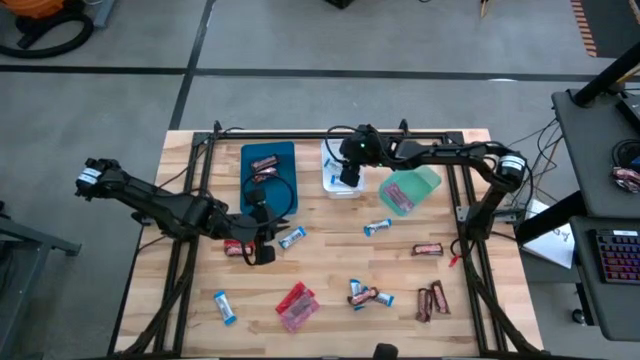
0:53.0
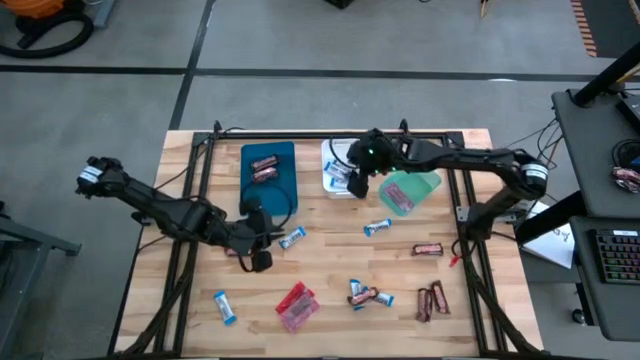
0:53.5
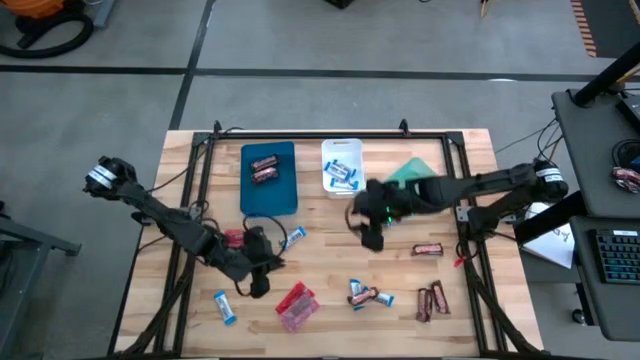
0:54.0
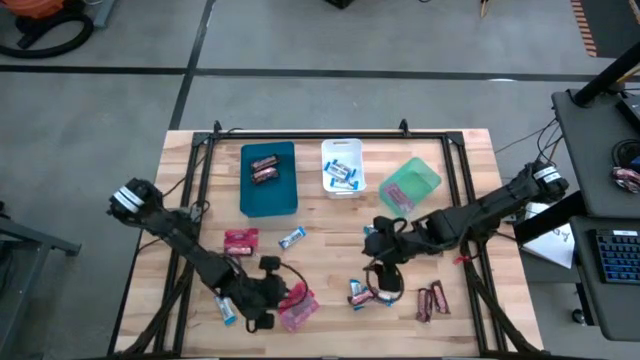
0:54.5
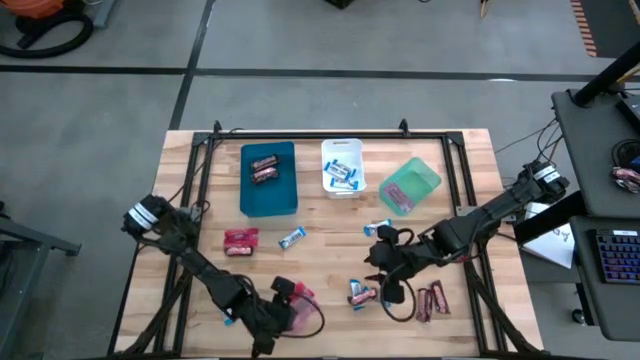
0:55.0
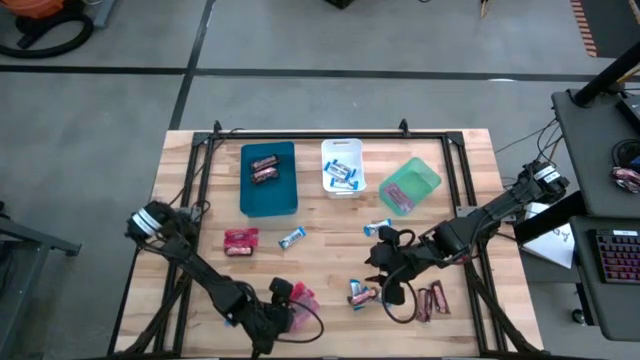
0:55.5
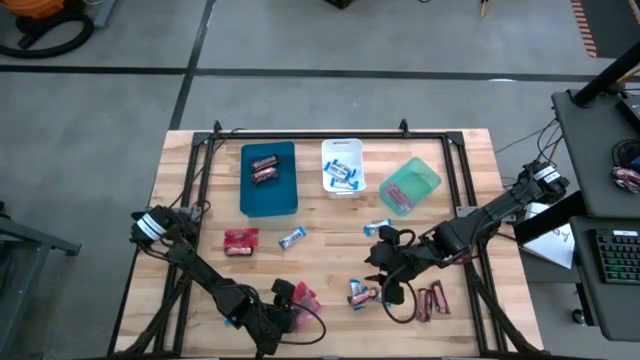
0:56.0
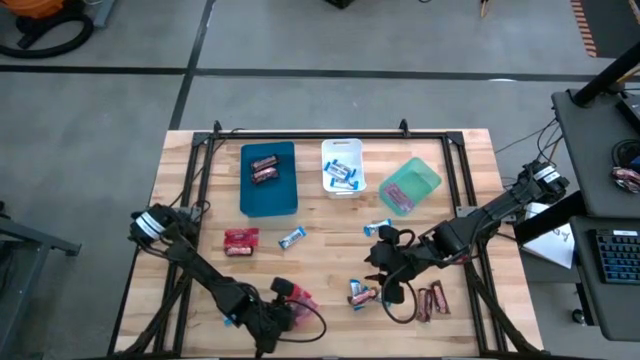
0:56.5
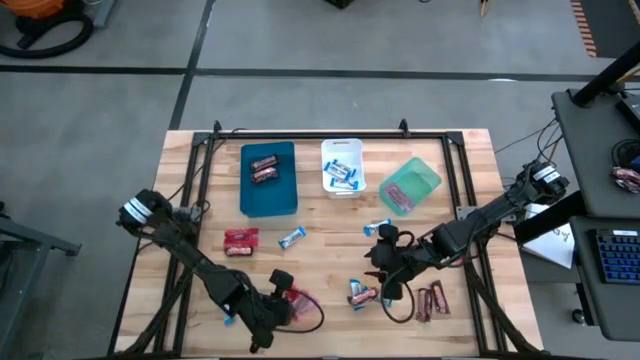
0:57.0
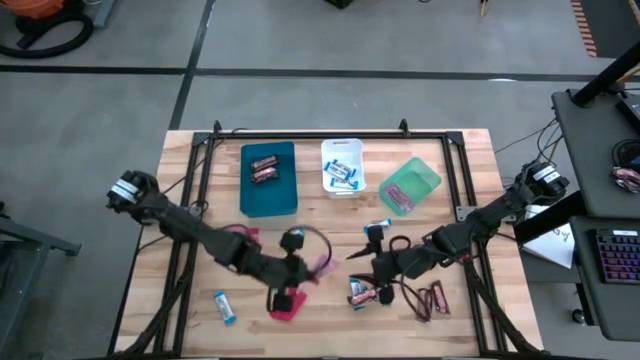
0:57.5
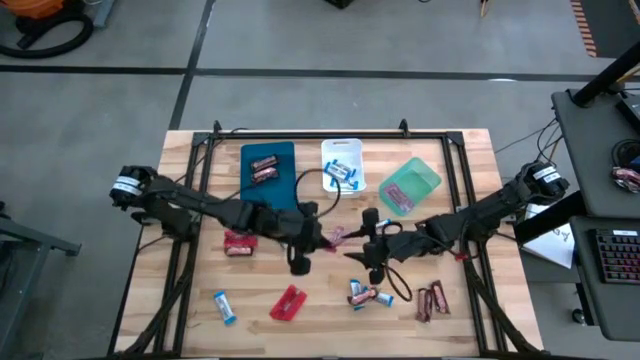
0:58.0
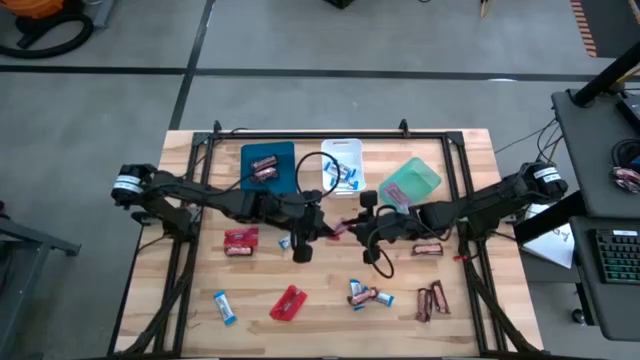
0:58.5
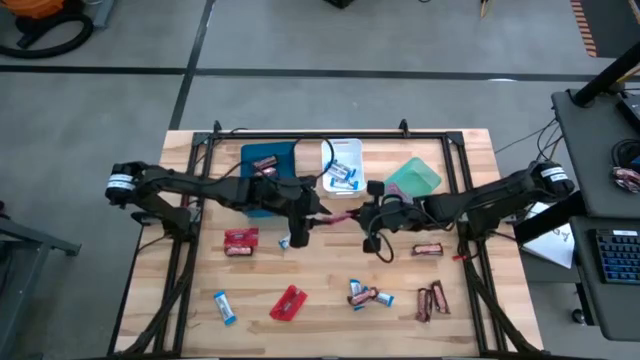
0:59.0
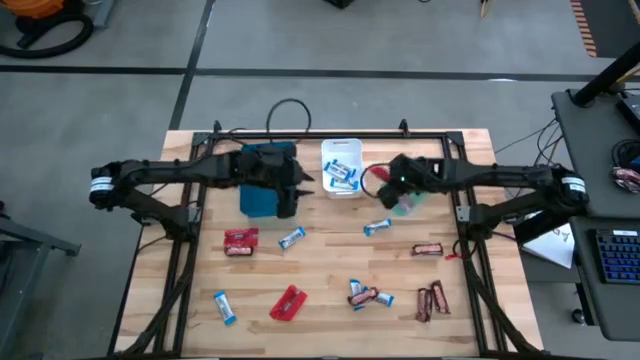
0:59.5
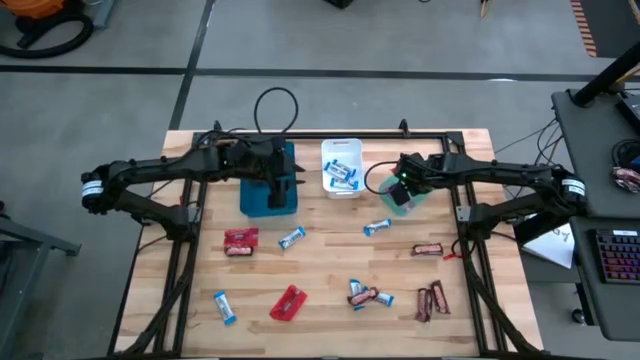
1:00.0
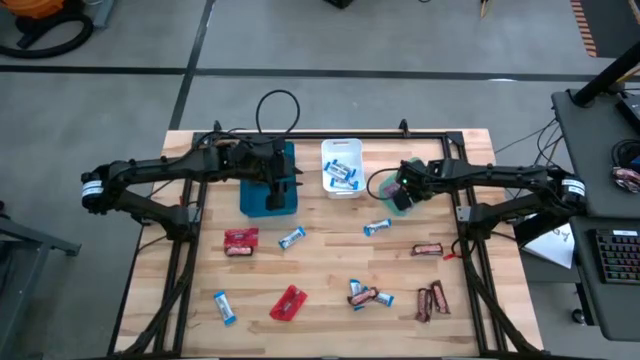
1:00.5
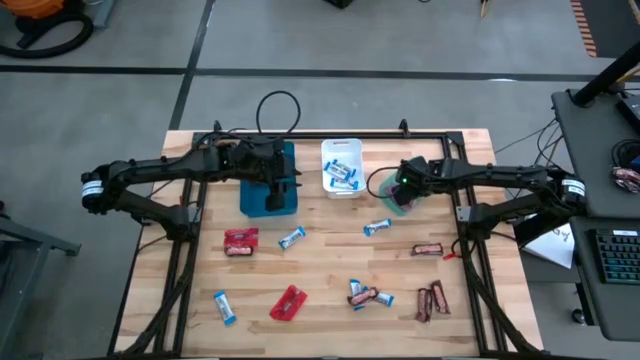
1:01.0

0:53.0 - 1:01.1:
Task: Sort candy
Put the red candy into the green bin

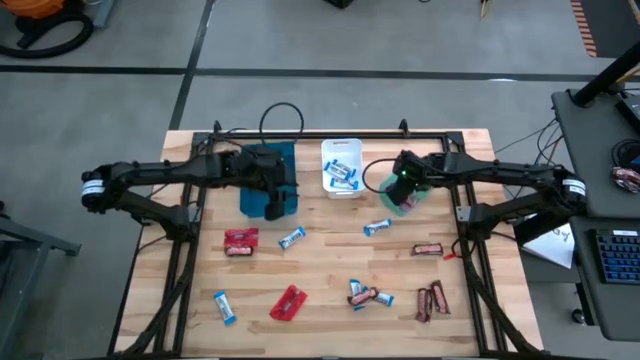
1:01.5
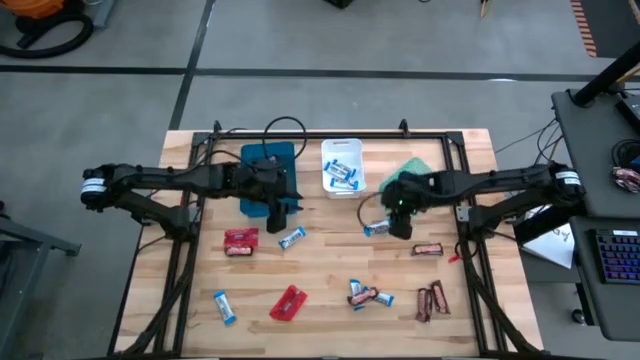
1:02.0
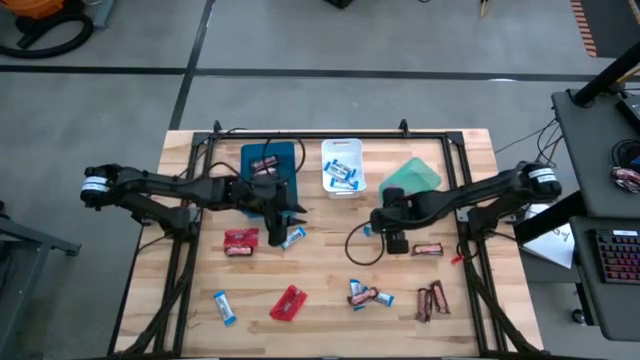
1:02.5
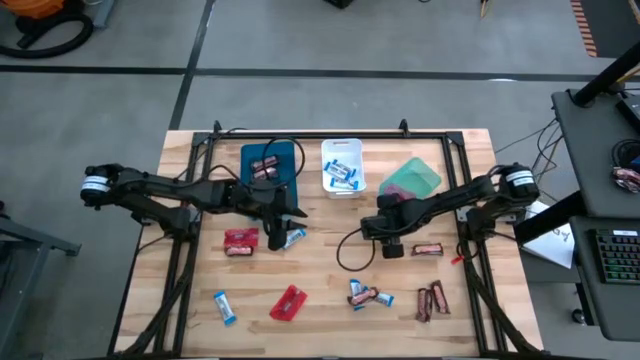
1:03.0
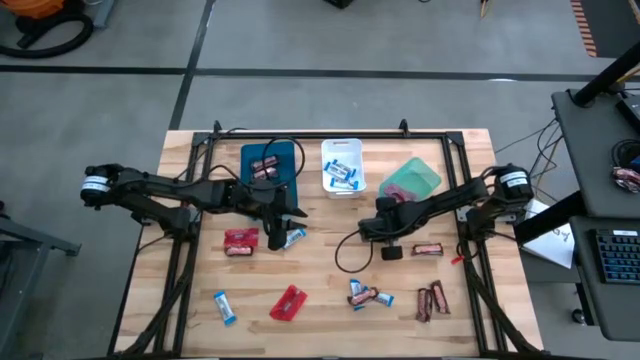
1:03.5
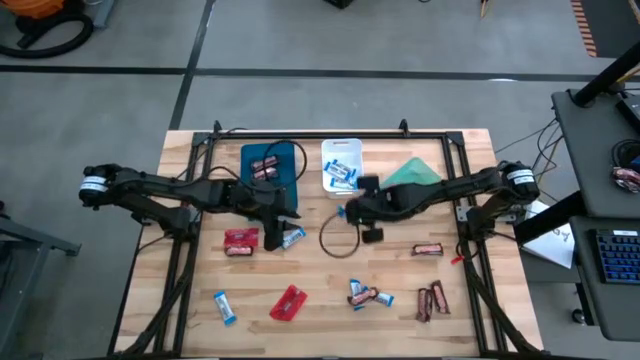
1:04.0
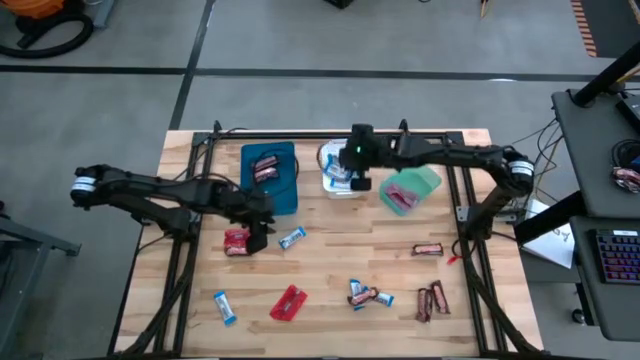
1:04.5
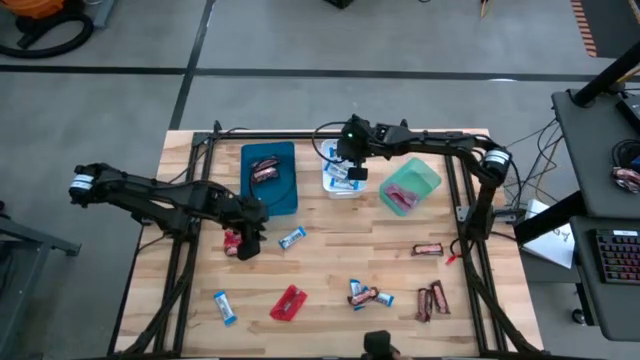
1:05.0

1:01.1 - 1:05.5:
Put the white chocolate into the white bin

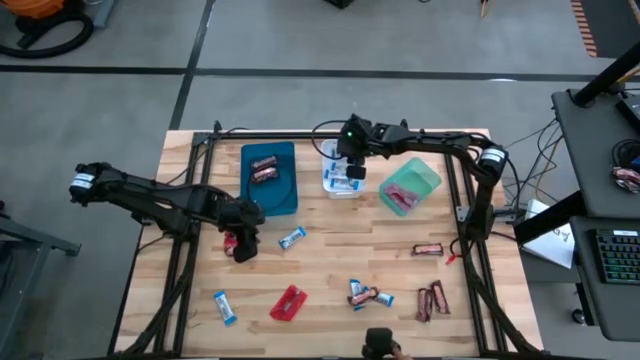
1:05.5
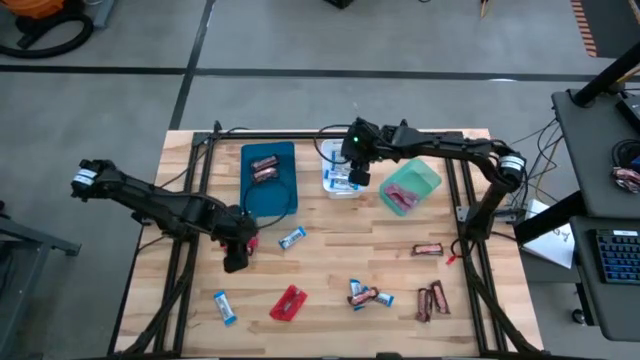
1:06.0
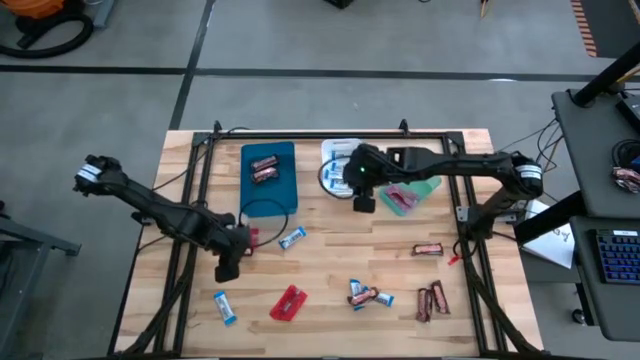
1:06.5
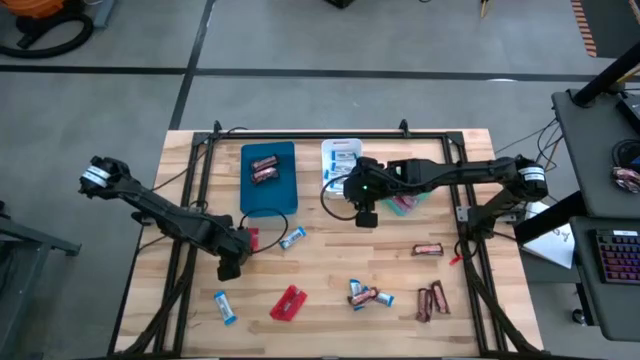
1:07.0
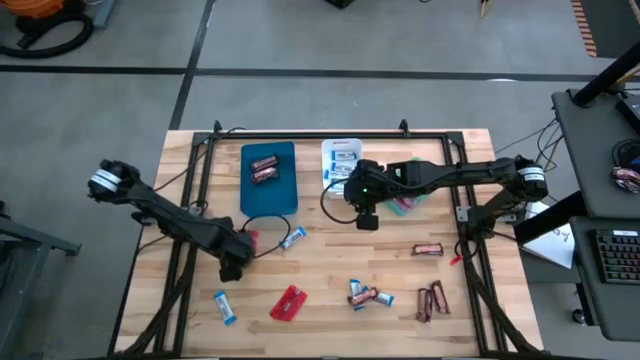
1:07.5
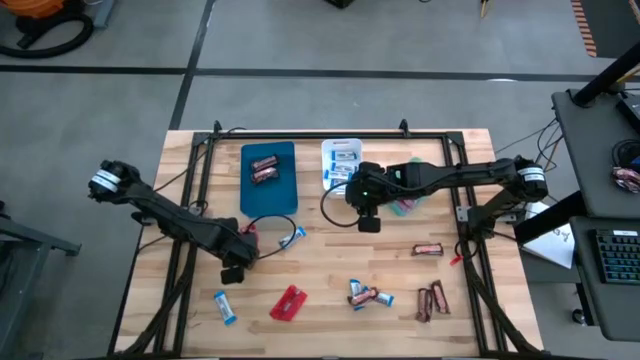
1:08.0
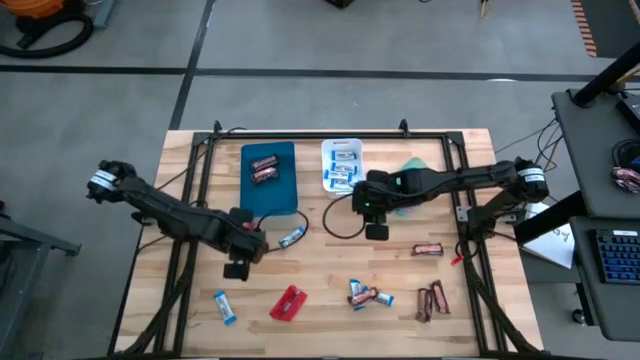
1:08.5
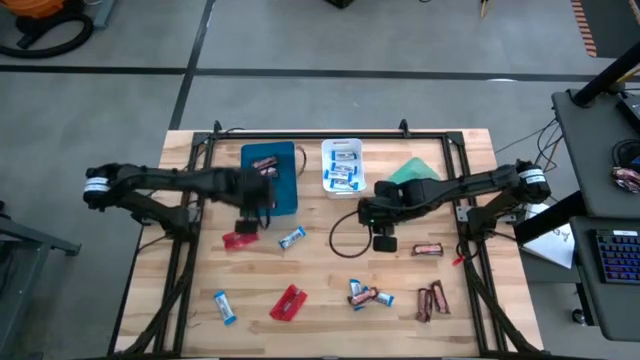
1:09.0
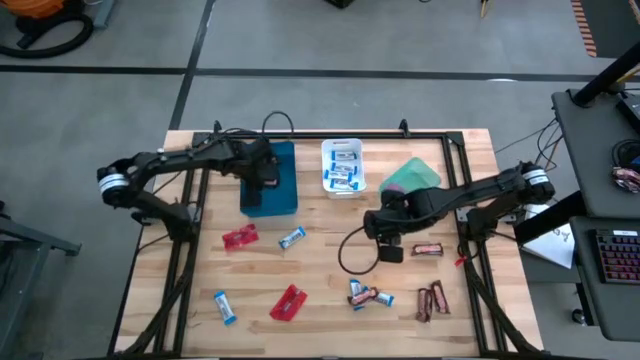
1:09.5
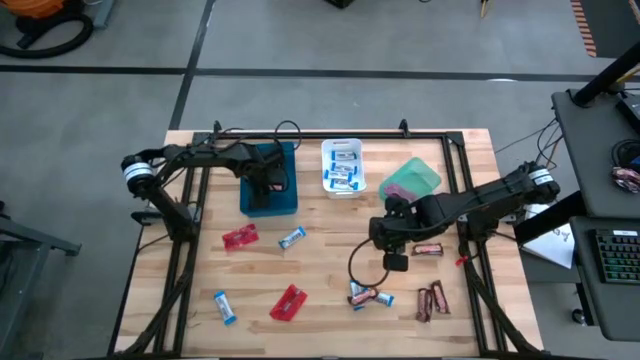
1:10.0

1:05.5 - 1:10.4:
Put the brown chocolate into the blue bin

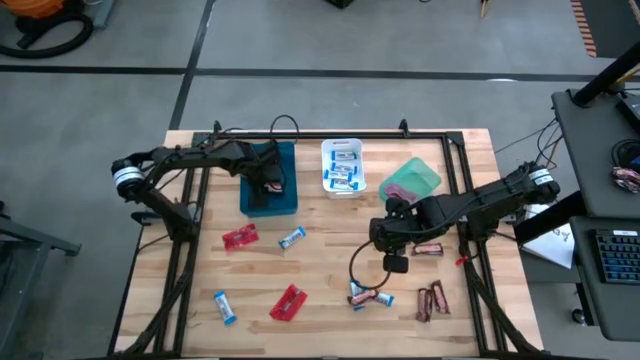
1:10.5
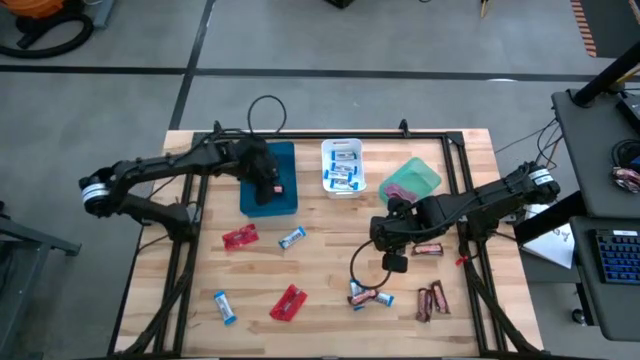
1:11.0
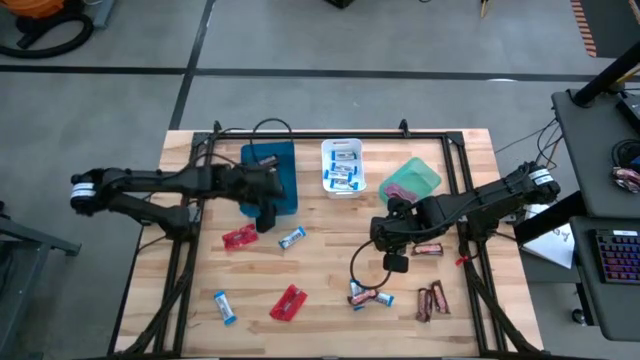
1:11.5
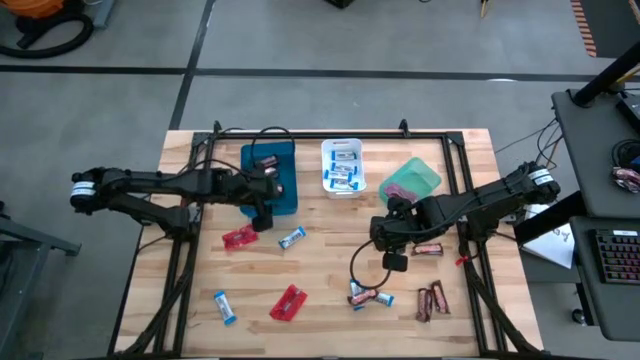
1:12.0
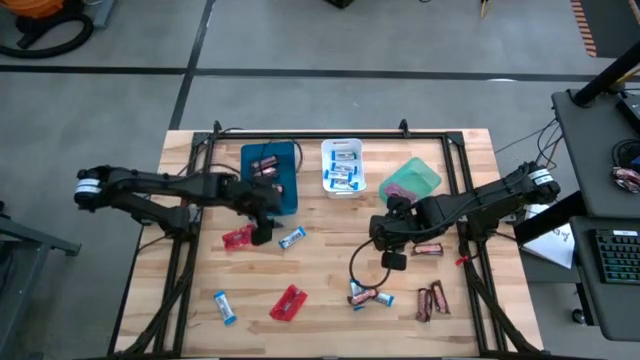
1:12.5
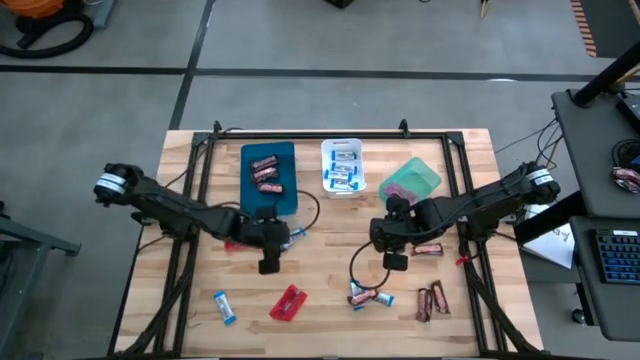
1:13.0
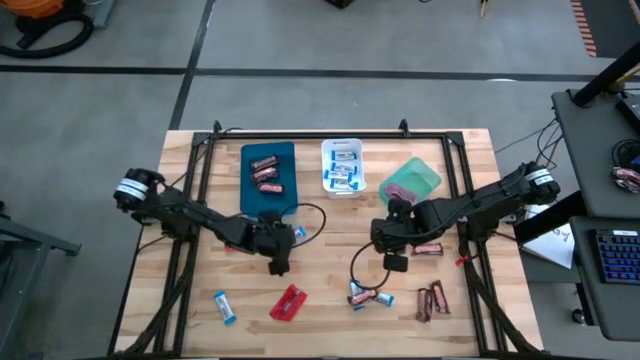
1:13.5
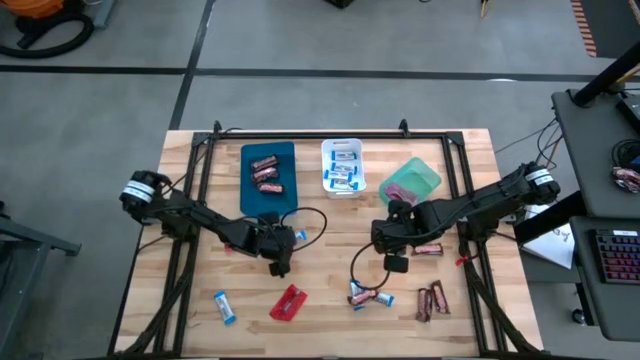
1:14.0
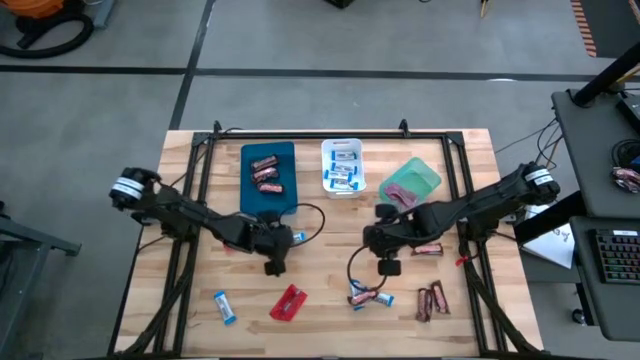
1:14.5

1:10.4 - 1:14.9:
Put the white chocolate into the white bin
